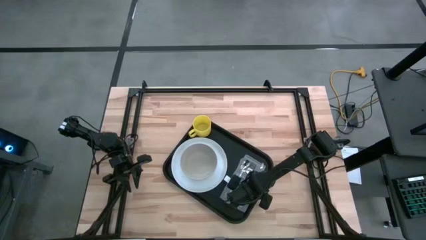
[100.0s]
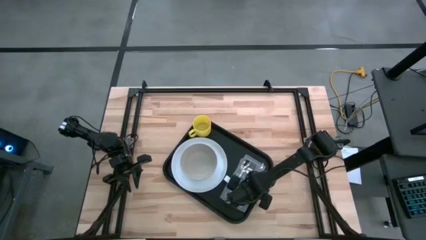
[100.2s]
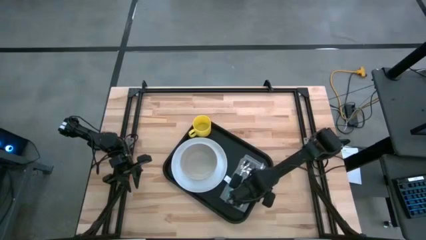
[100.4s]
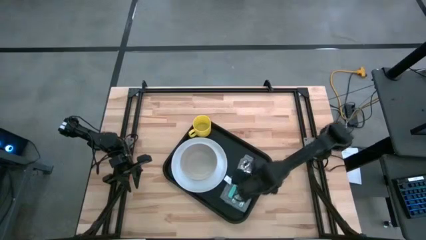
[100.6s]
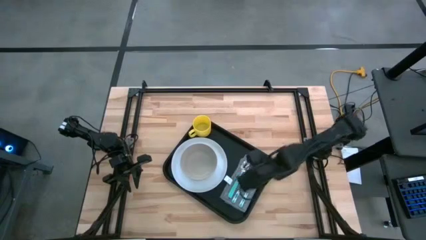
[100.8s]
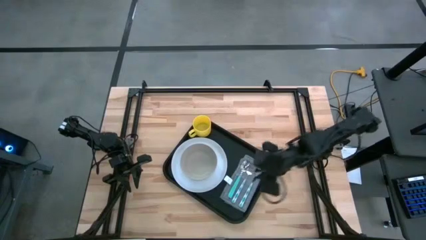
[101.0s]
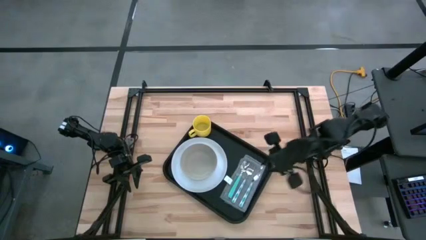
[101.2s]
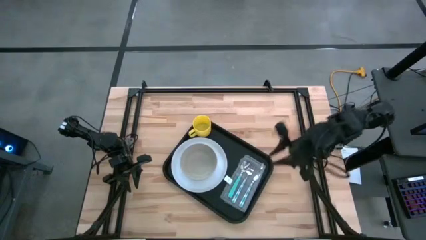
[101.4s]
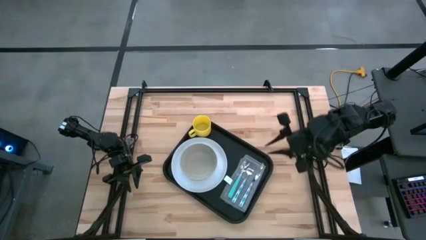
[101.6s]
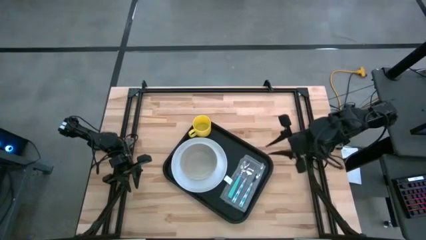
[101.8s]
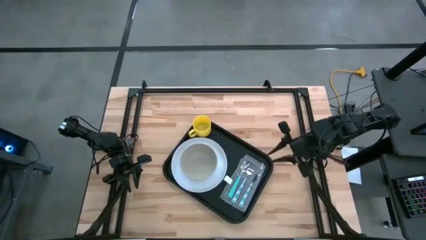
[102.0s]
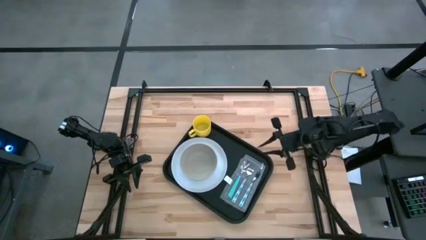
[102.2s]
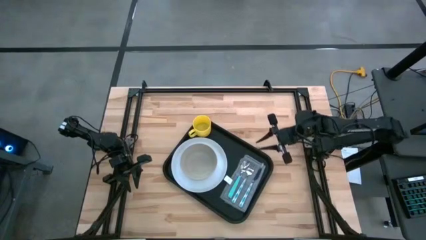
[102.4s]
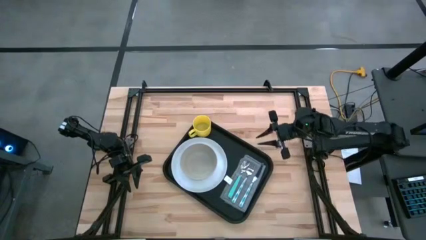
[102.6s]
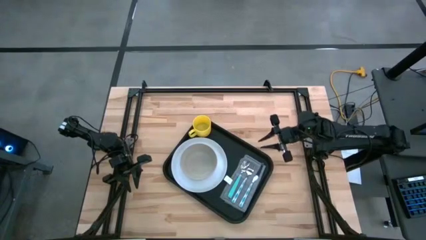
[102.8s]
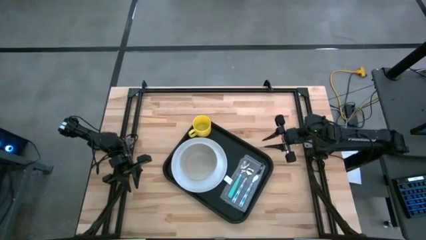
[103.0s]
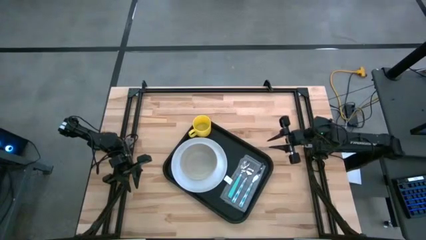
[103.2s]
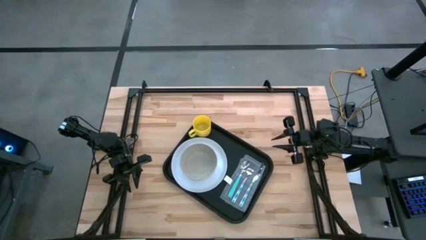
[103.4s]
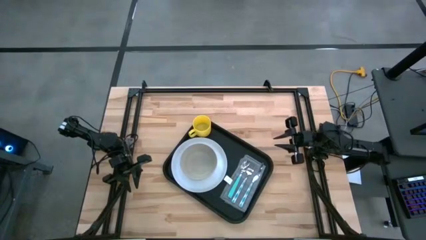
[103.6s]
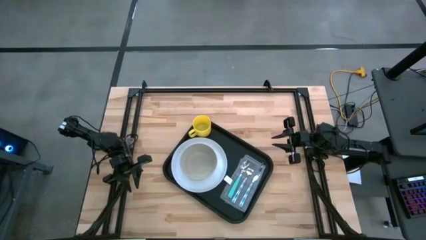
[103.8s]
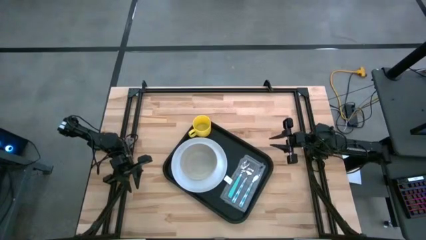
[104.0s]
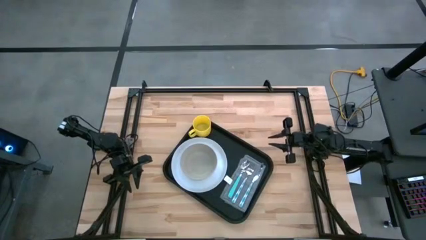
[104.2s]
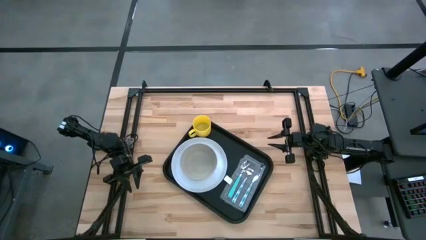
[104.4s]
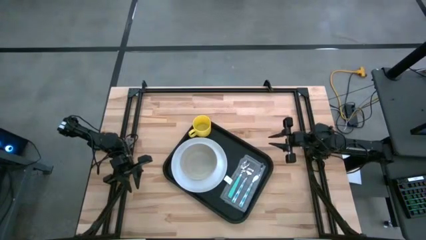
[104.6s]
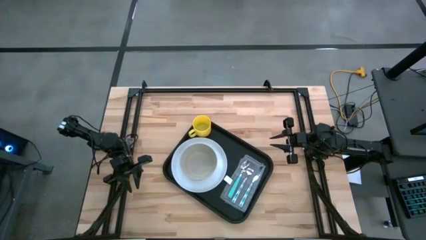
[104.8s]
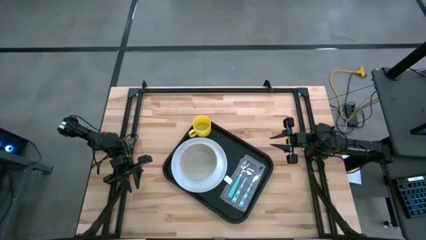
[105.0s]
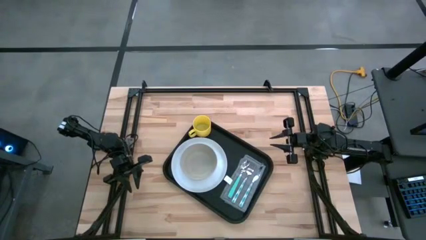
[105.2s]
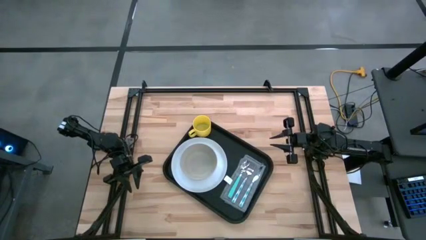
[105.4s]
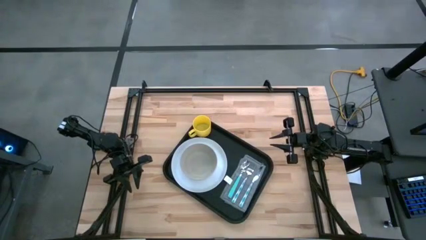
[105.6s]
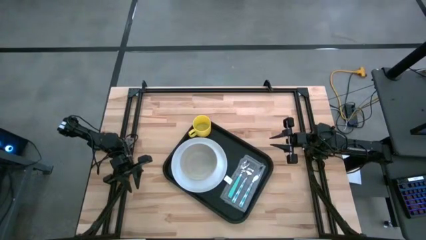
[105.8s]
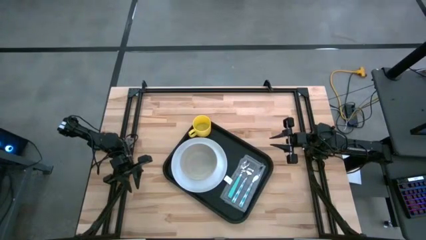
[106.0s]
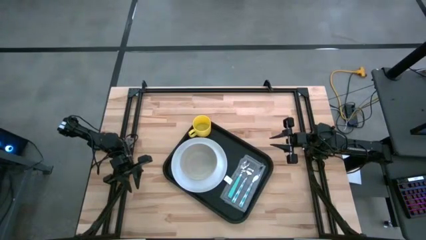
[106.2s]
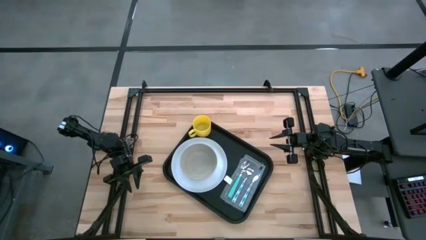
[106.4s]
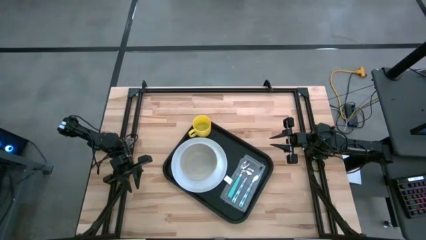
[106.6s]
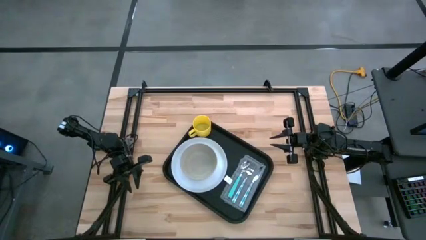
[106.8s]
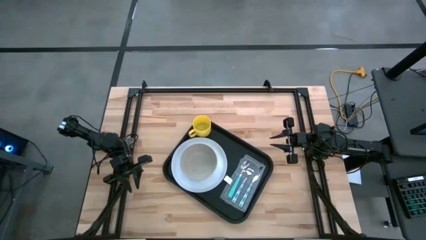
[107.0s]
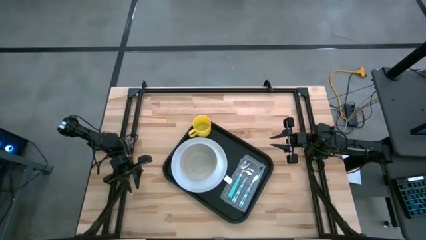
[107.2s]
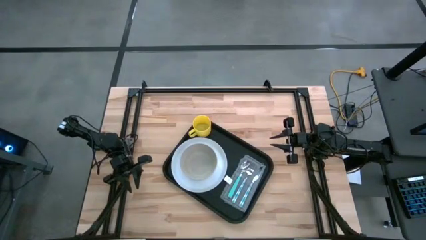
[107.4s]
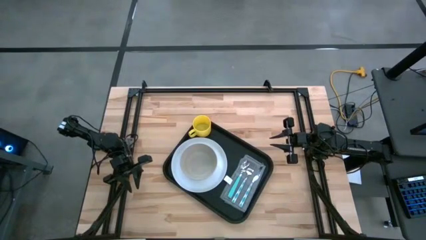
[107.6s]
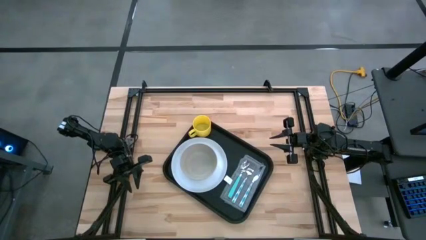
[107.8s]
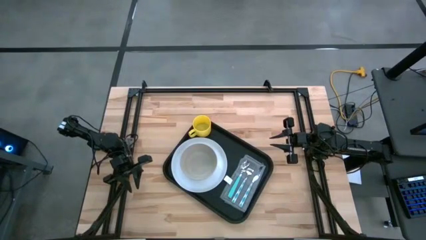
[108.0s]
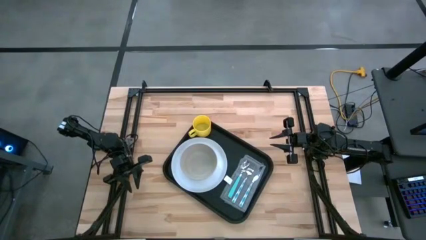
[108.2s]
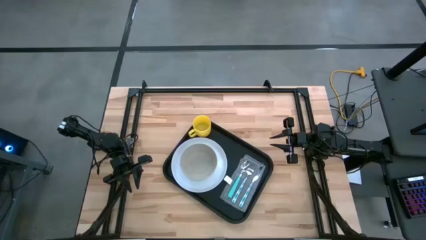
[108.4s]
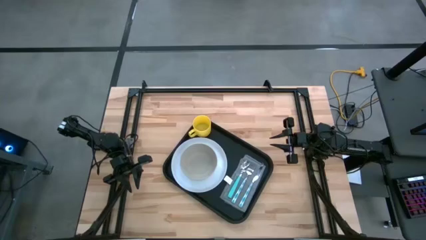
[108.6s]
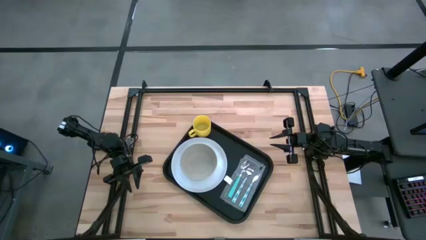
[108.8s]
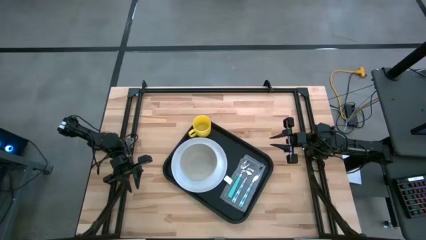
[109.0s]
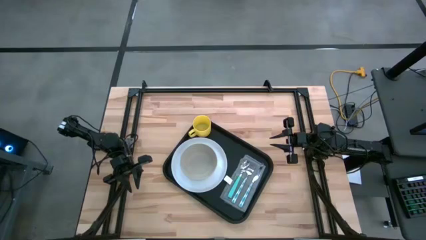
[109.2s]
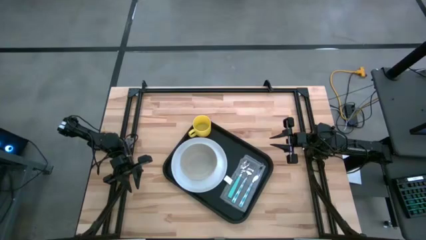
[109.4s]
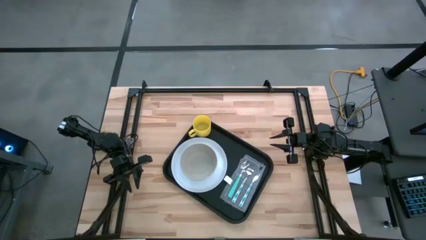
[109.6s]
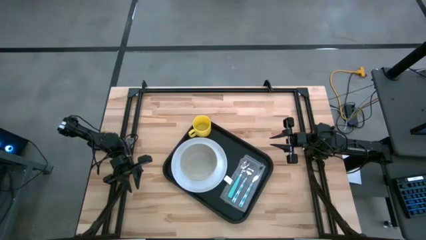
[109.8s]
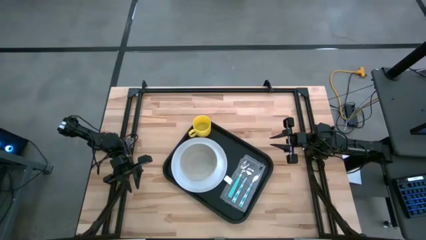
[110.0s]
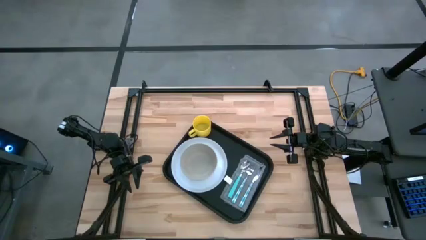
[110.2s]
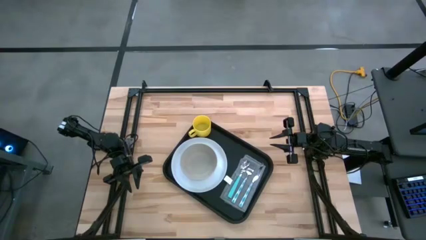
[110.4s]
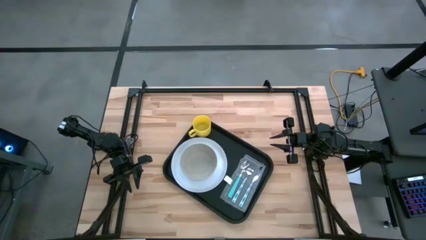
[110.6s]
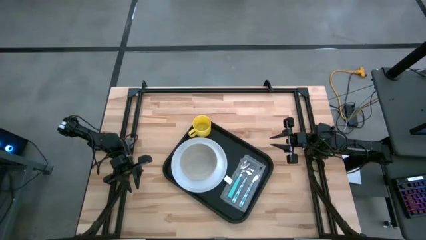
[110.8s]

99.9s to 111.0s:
Task: Set up tray
Return to Home Position

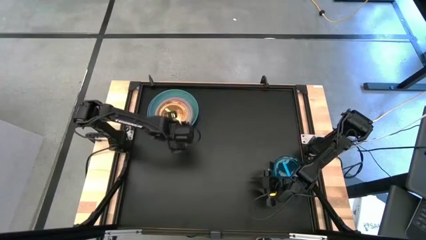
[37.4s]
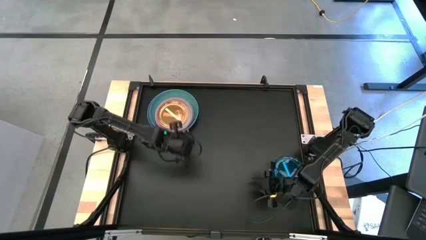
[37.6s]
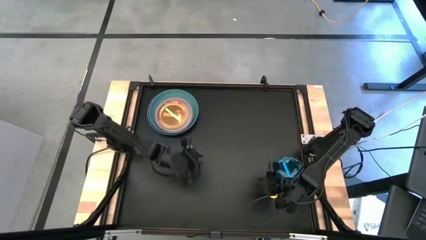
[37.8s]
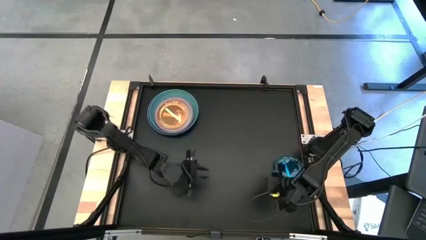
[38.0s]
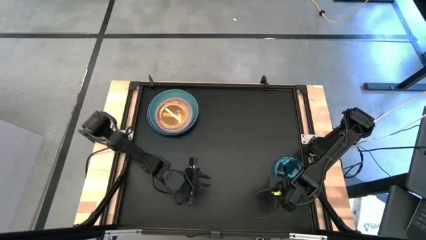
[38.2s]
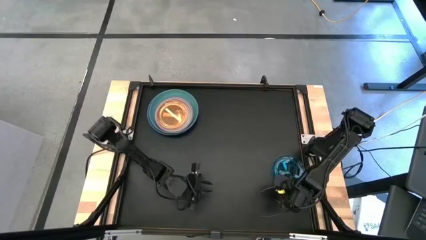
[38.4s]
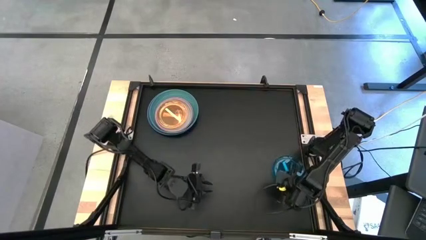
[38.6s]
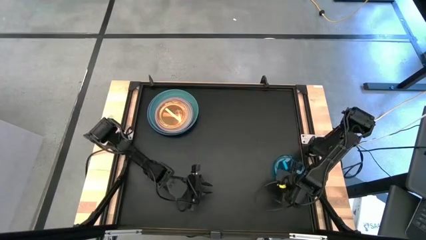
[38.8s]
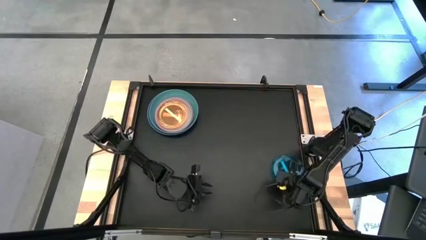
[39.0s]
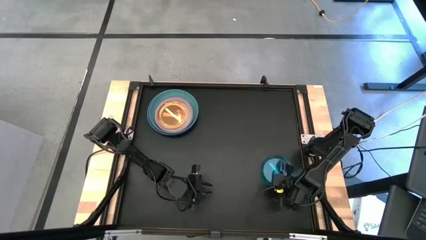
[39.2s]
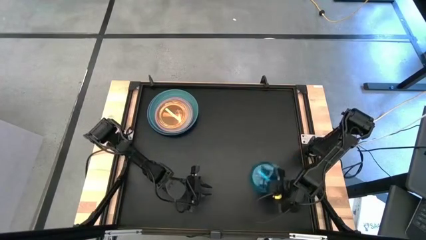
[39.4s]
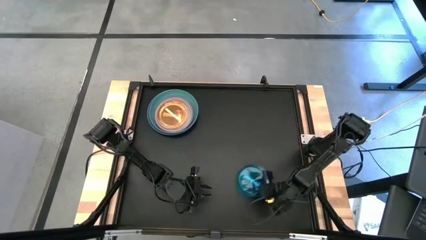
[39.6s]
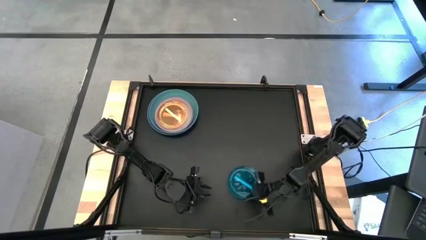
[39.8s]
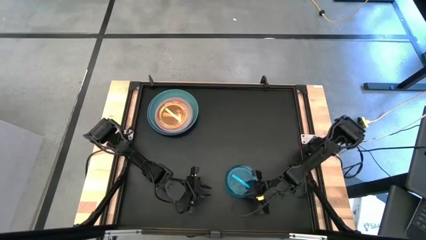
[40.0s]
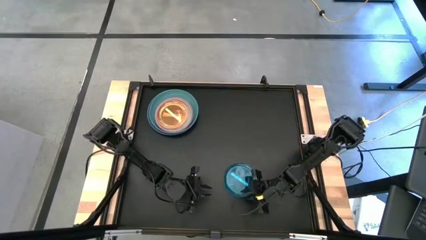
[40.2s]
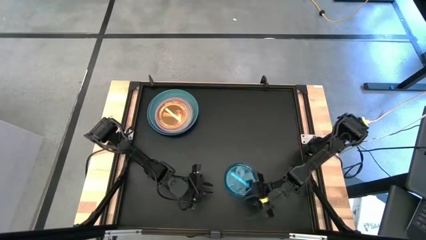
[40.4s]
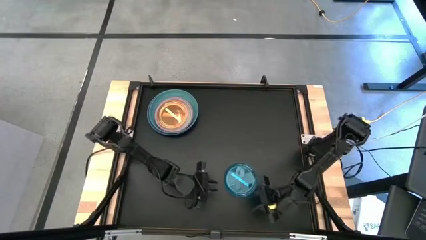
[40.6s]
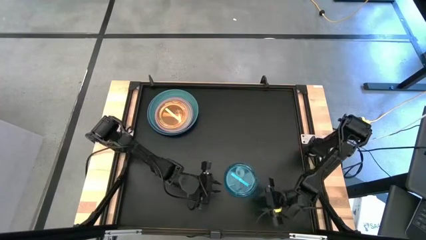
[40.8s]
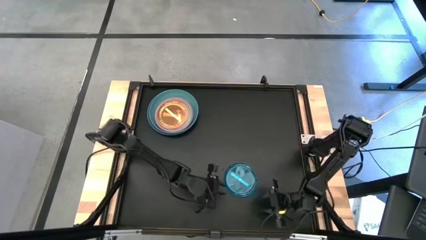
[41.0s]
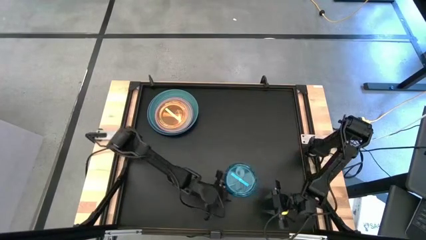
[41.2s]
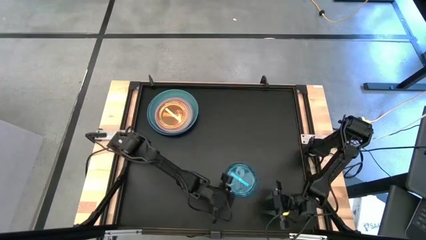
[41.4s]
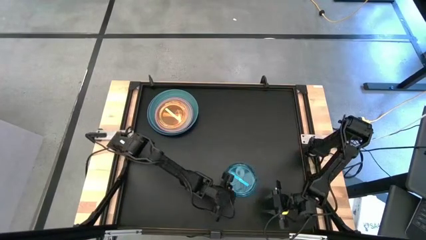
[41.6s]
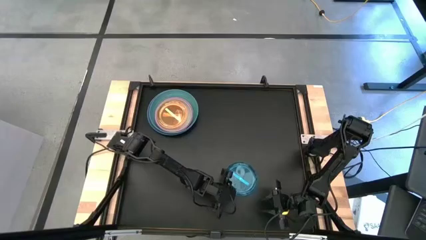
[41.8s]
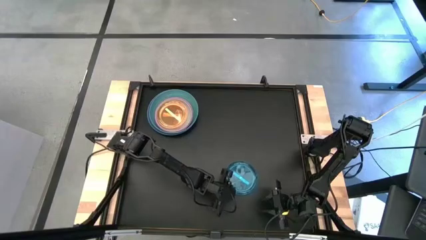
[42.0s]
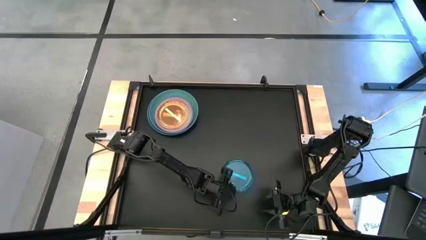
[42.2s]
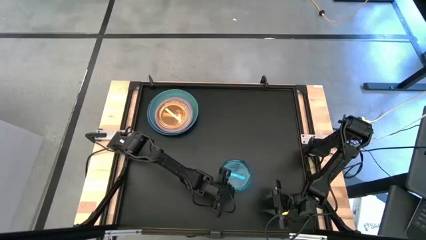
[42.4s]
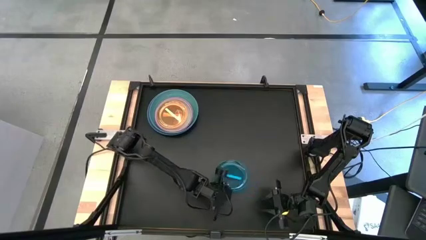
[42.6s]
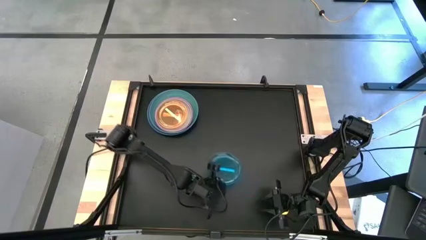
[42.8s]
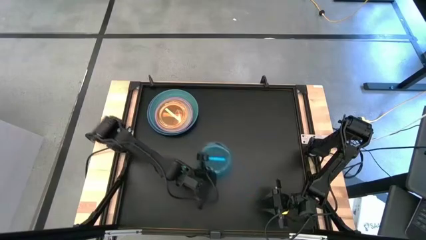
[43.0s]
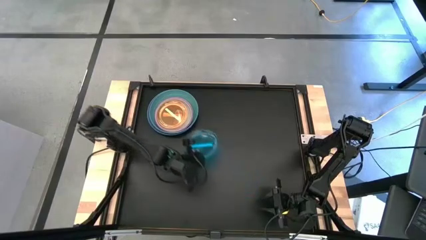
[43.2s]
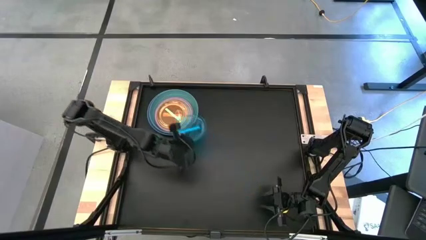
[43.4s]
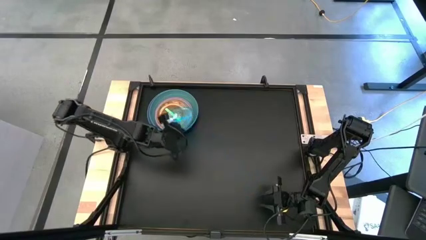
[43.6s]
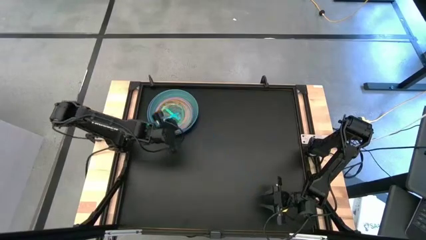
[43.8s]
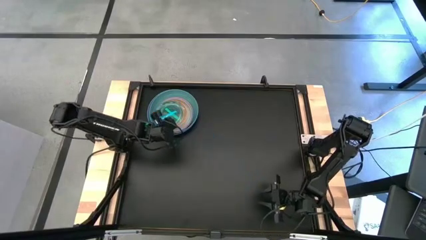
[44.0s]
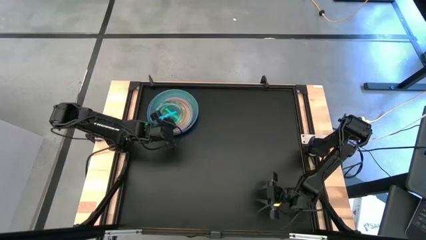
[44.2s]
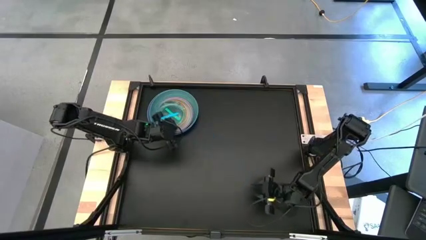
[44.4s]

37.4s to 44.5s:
Task: Stack plastic plates
Stack the light blue plate on the light green plate
